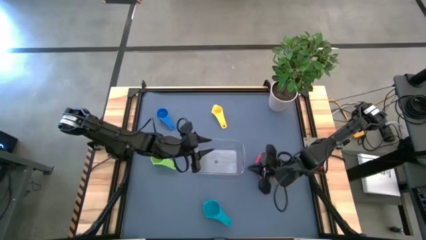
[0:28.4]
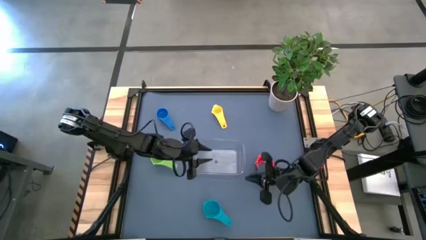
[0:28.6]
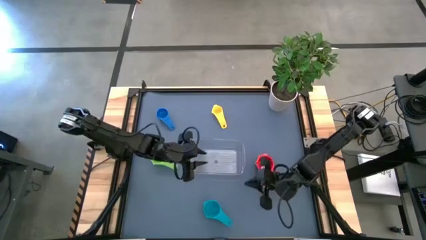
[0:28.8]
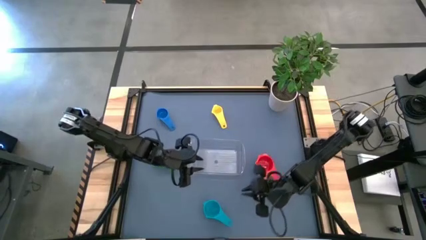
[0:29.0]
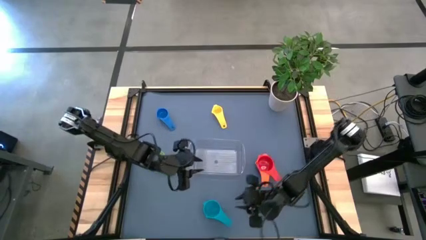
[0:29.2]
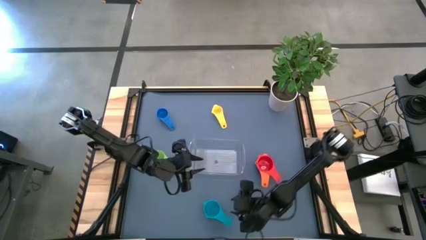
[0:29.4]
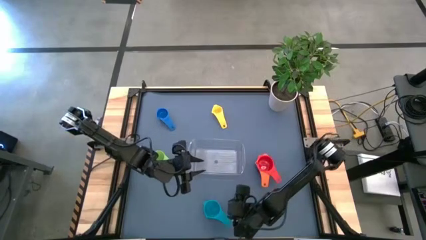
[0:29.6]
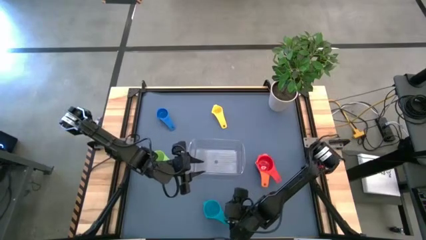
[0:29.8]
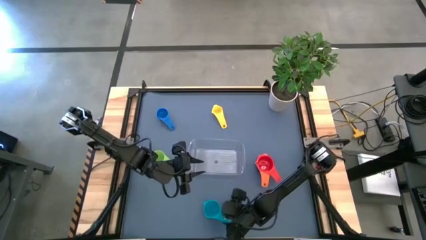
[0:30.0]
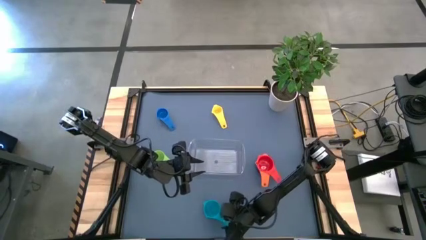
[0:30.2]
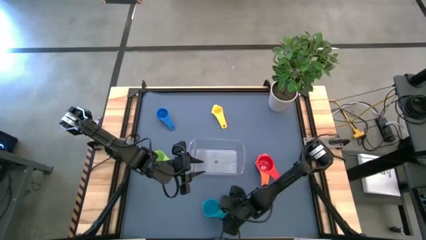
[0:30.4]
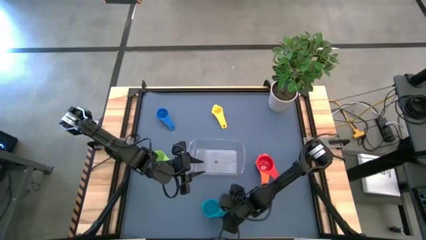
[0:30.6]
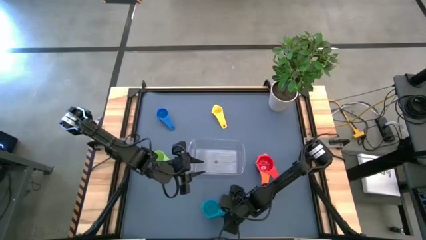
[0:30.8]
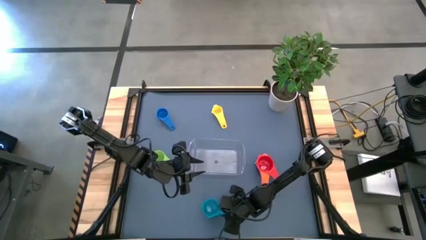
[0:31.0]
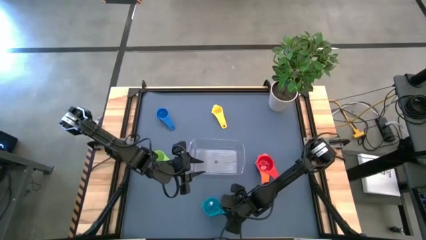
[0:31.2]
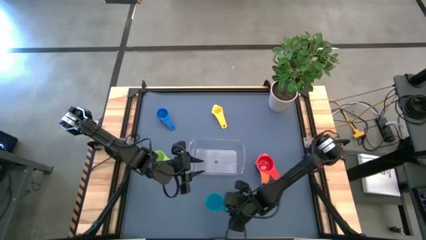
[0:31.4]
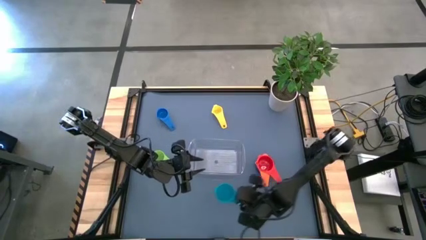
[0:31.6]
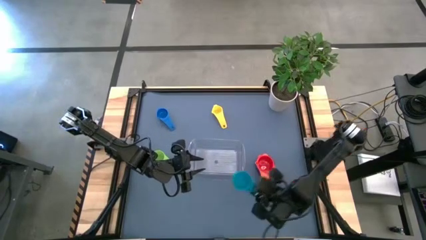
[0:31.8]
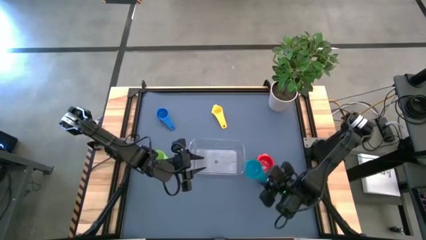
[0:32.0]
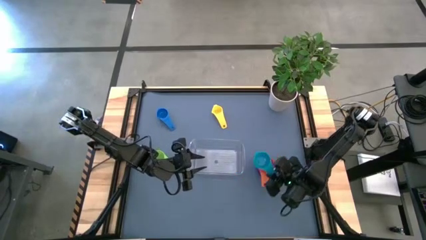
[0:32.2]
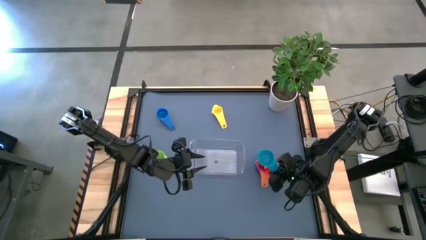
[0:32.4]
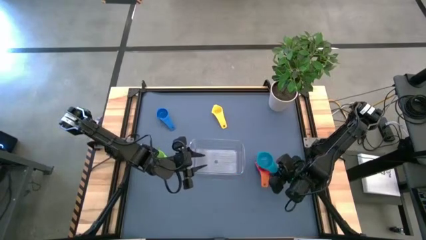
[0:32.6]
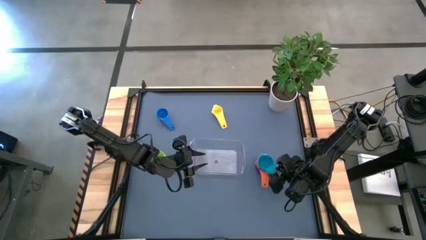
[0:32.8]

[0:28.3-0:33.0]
Task: Nest measuring cups in basket
Stack the light blue measuring cup on top of the red measuring cup

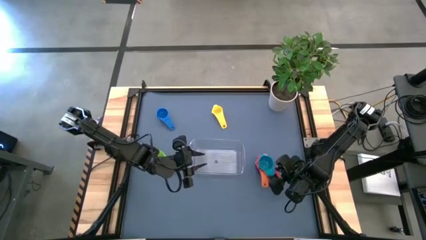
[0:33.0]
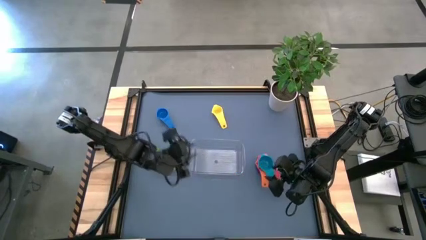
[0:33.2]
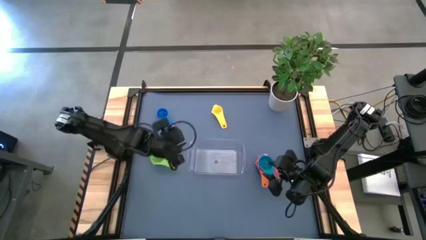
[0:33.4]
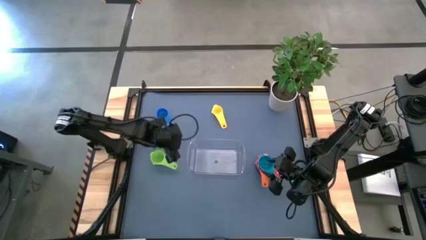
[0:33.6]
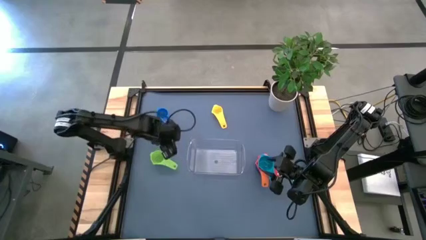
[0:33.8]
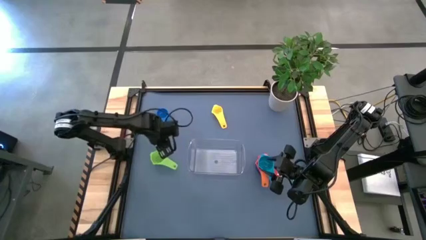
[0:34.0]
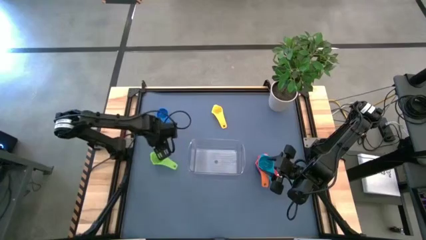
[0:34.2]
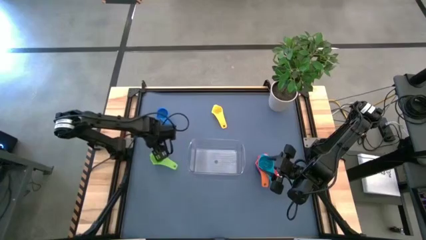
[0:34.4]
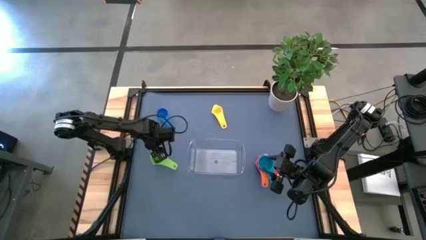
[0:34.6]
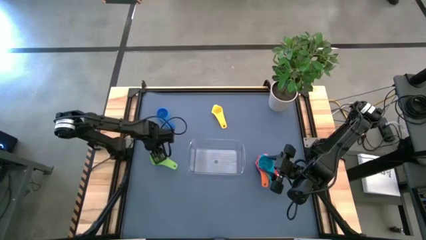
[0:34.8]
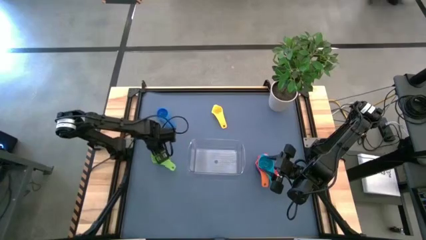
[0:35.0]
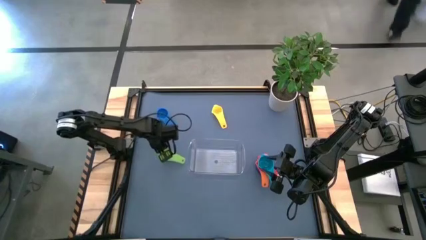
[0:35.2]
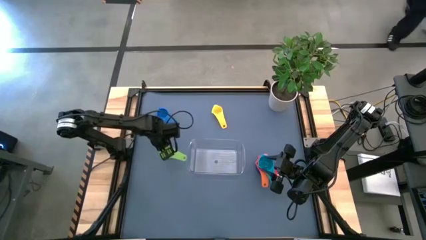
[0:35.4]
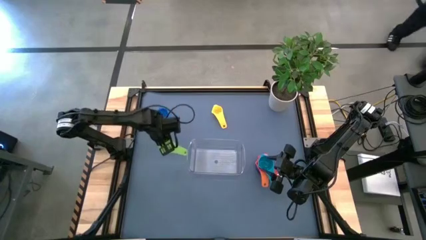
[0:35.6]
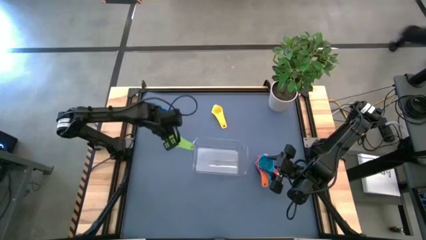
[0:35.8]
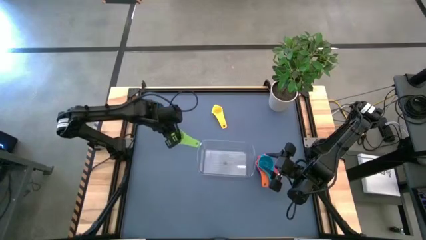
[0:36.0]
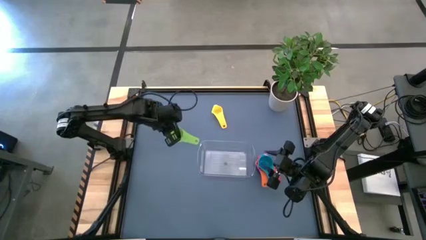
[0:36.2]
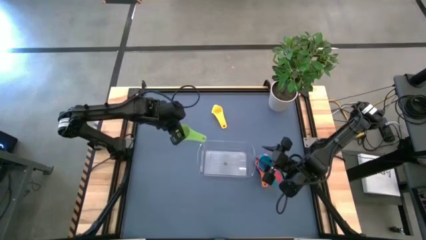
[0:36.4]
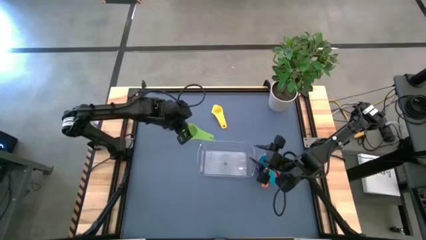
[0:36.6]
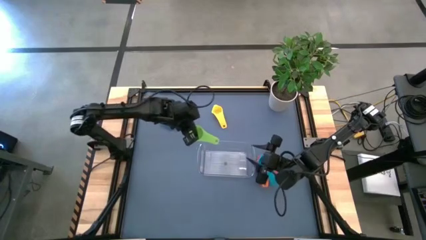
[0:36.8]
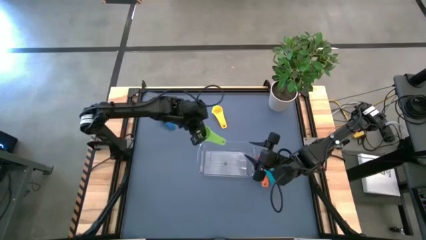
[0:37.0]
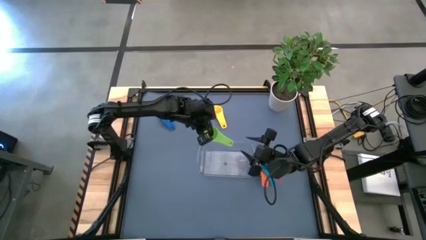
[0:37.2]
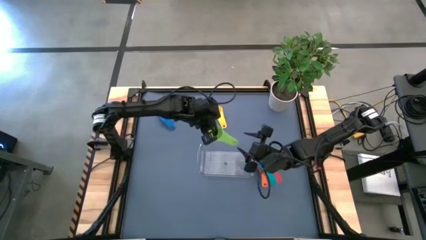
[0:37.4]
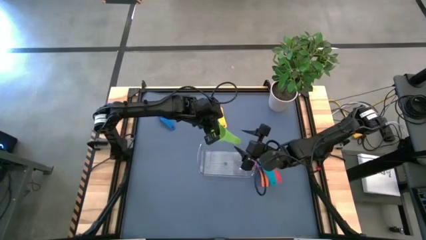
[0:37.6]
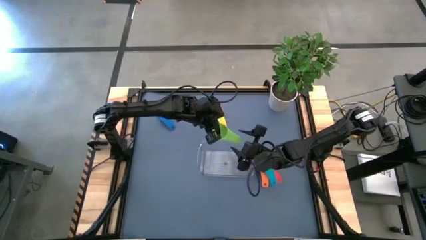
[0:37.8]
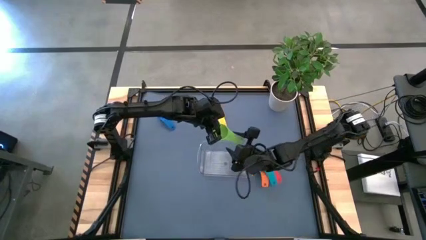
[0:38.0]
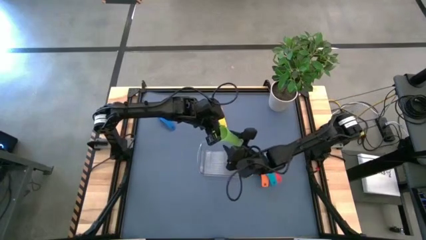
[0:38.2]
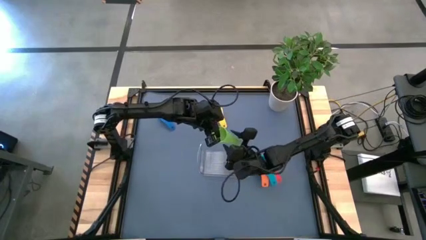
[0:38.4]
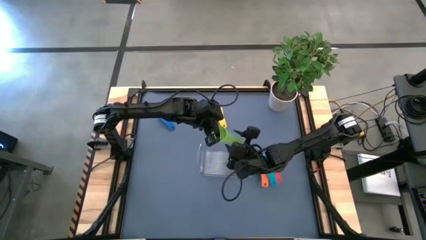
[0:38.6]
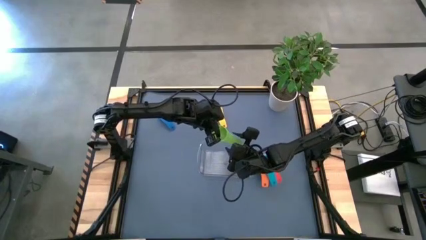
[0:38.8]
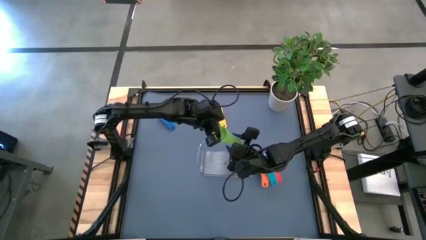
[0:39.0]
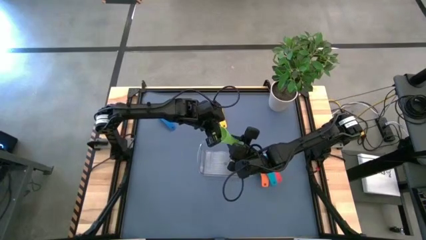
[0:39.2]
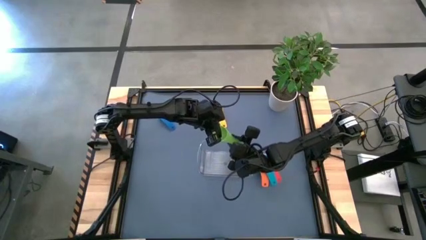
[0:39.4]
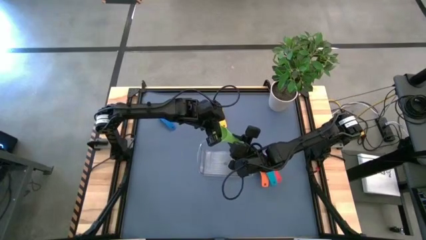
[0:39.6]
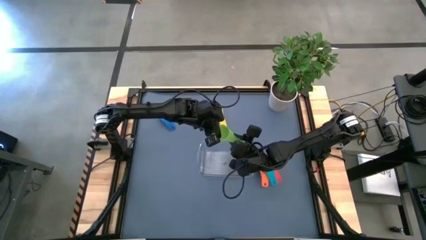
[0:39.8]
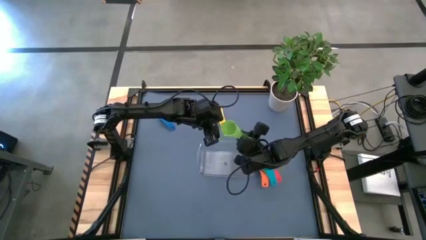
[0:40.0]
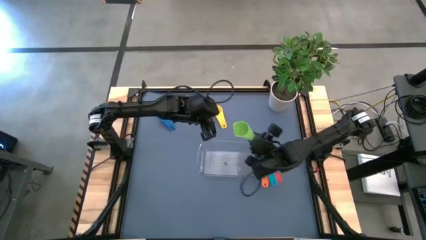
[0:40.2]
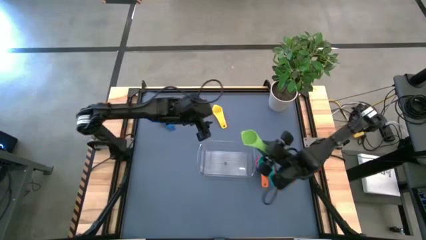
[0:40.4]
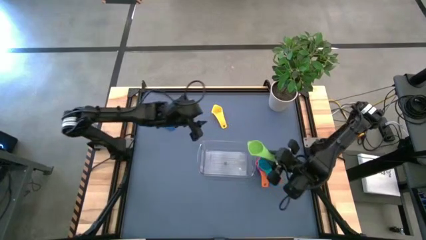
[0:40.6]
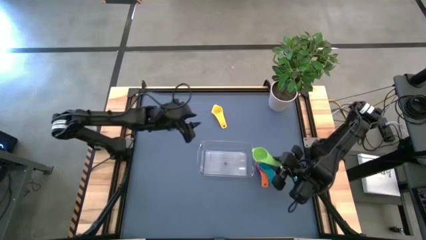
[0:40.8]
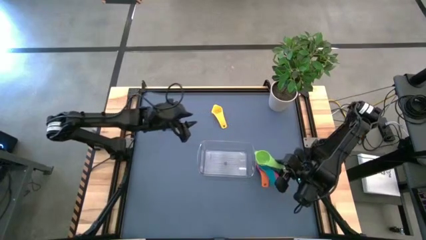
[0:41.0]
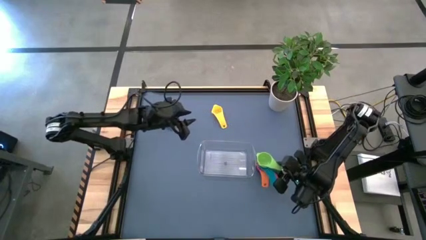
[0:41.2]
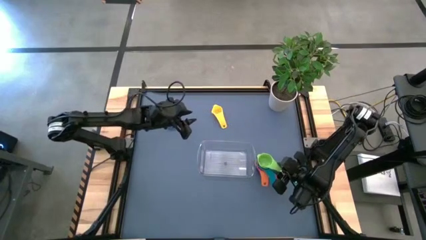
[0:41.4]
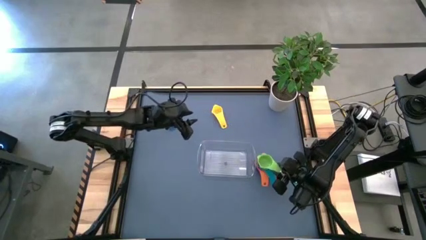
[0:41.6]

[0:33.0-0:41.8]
Stack the green measuring cup on top of the light blue measuring cup
